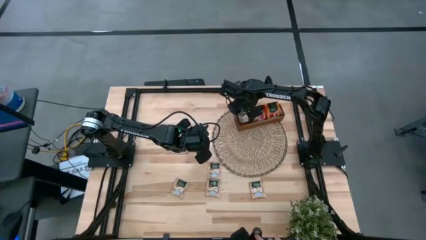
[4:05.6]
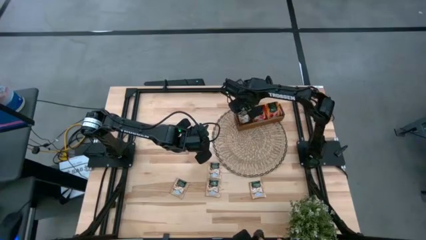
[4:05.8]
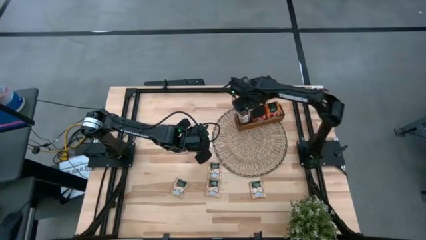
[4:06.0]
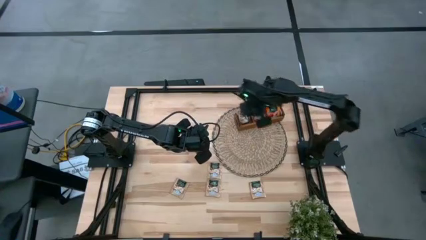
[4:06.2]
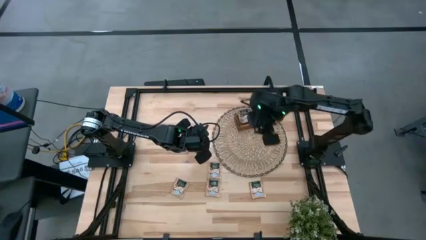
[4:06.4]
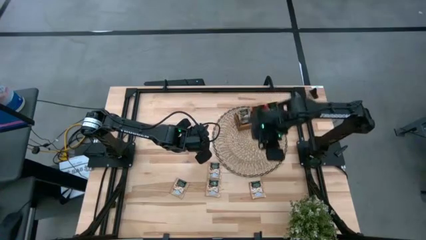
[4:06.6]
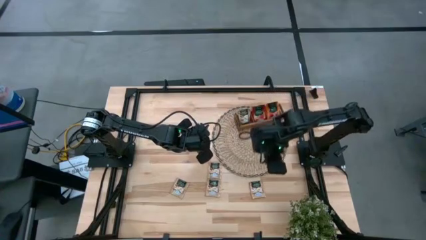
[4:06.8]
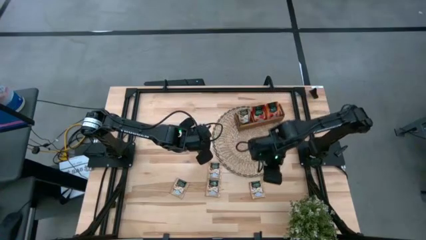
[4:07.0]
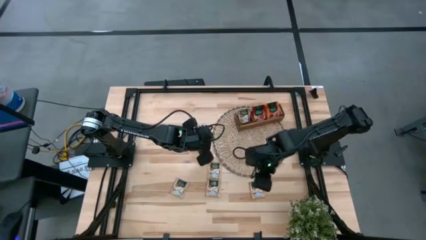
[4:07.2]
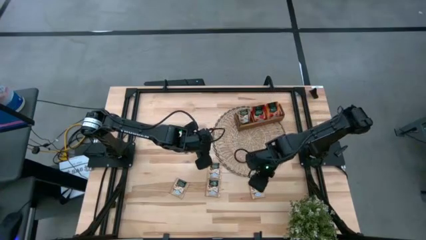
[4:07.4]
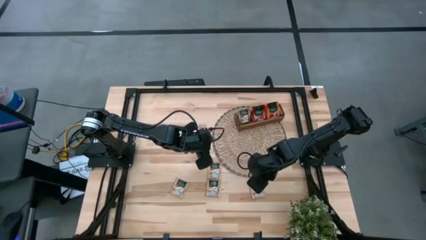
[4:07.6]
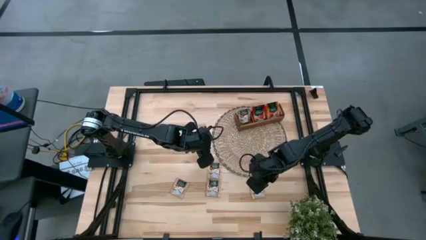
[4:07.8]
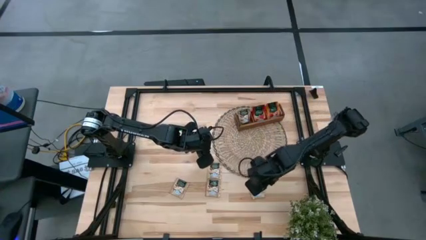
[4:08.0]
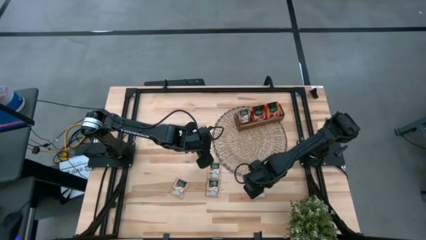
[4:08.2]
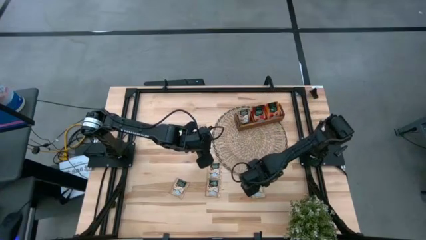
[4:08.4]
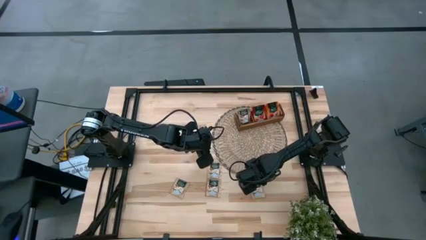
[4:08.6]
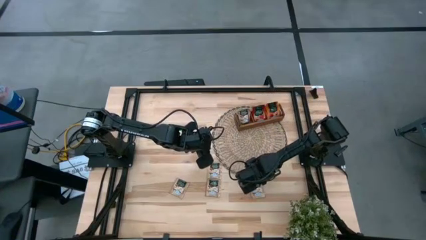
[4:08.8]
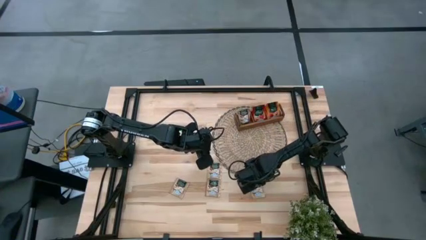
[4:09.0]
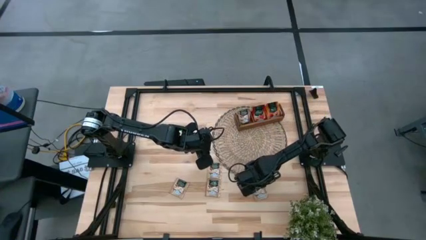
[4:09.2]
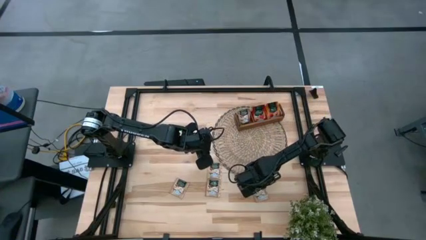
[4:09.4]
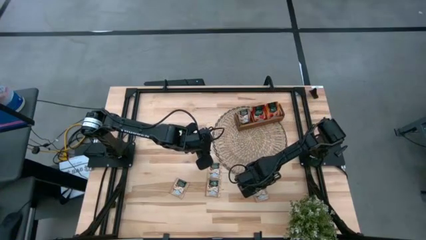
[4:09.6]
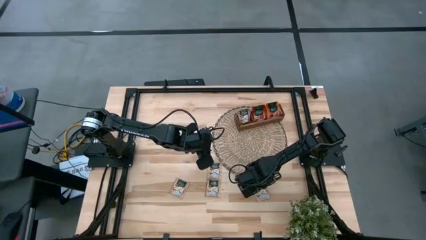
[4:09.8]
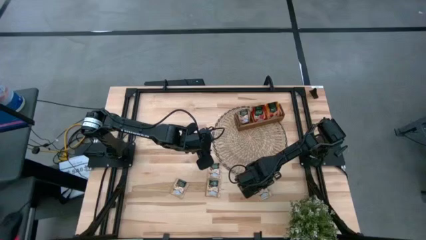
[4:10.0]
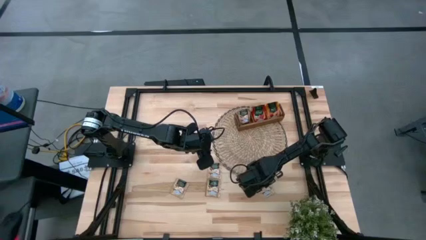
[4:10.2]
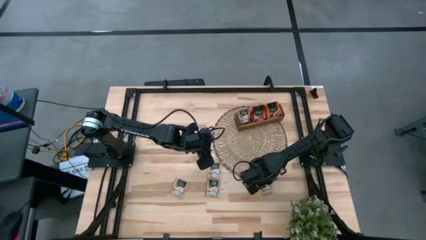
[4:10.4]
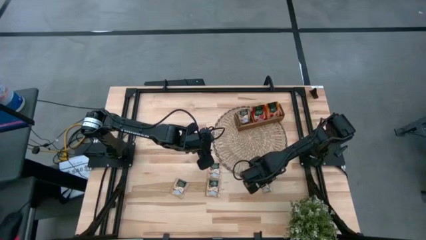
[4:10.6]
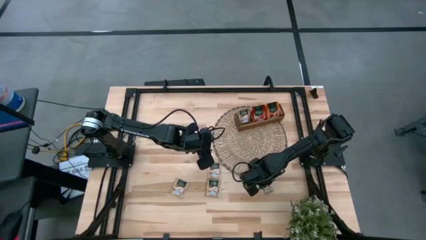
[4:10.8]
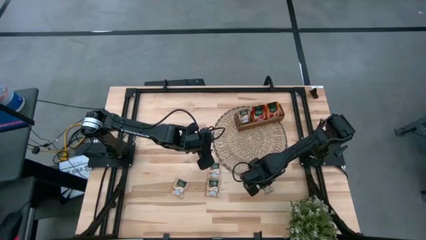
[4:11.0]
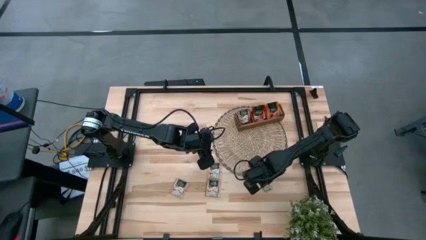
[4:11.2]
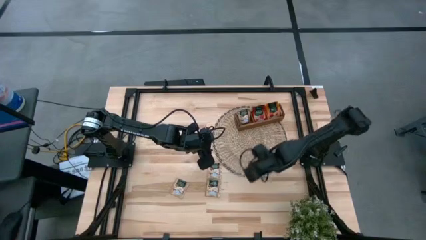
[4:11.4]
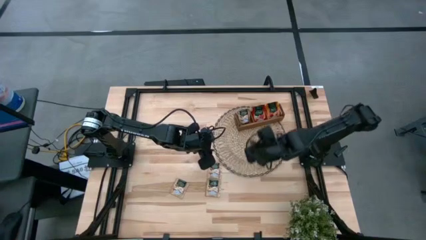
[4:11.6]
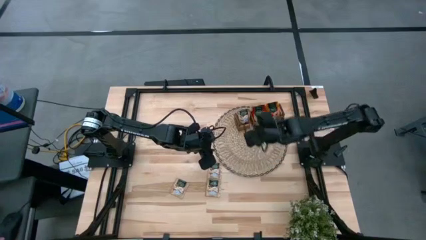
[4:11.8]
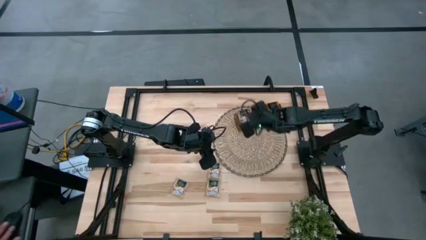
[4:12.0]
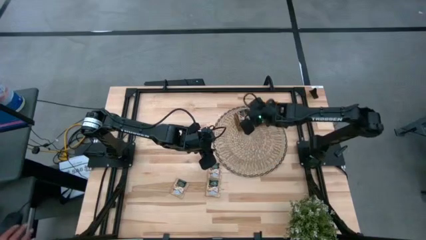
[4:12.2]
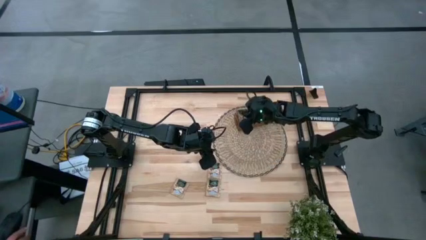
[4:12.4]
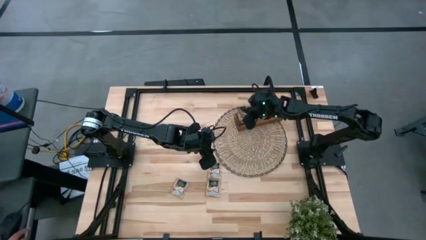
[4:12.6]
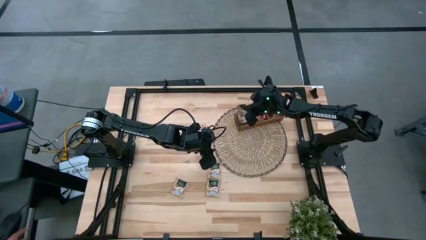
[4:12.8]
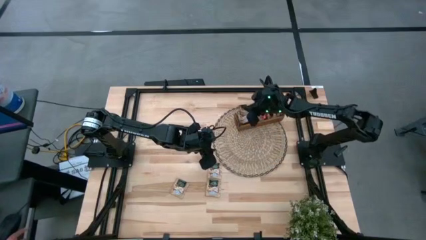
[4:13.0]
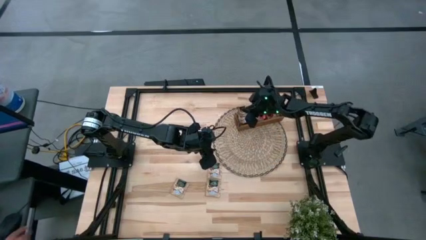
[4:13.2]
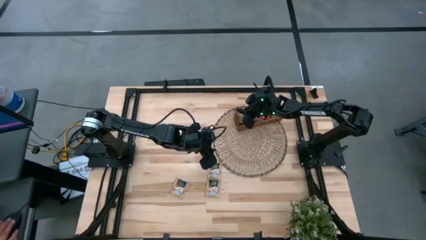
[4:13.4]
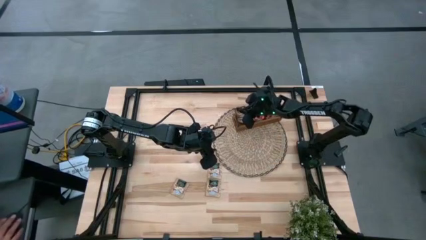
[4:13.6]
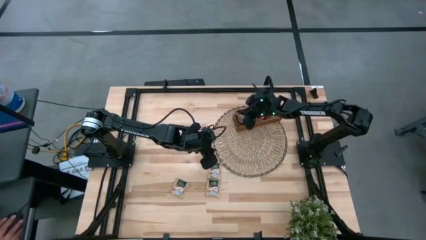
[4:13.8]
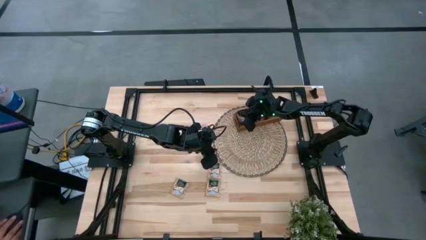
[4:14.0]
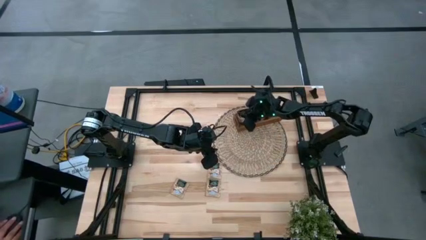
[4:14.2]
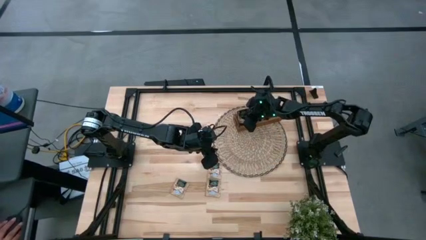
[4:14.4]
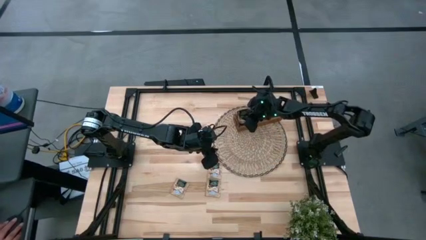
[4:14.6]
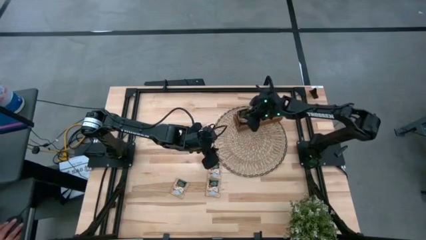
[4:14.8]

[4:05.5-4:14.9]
Task: Pick & Place Tea
Put the brown tea pack into the left compartment of the brown organizer
